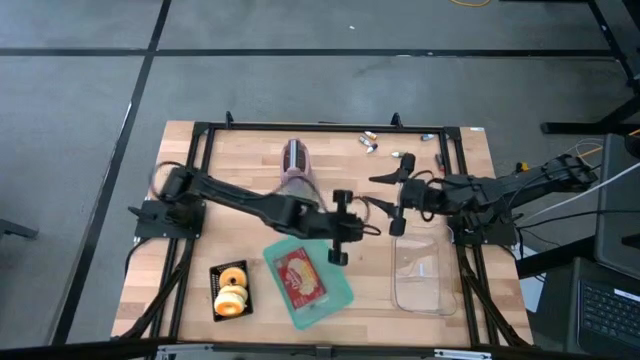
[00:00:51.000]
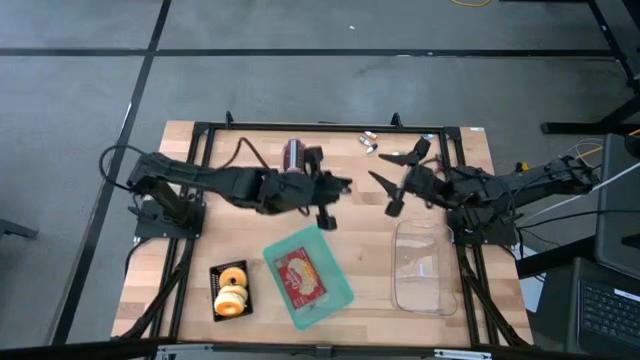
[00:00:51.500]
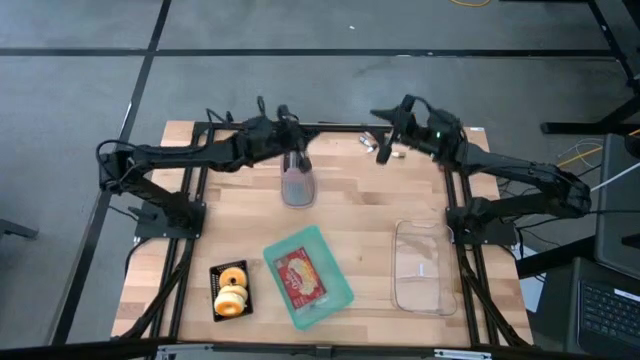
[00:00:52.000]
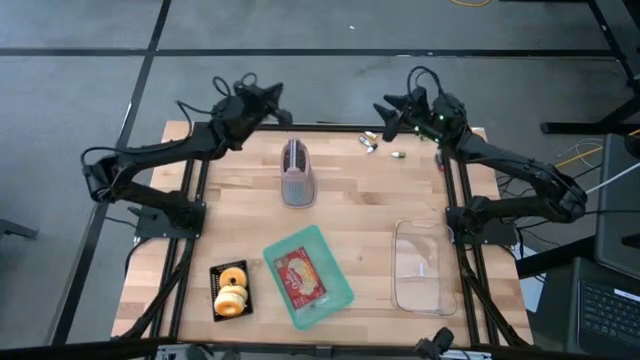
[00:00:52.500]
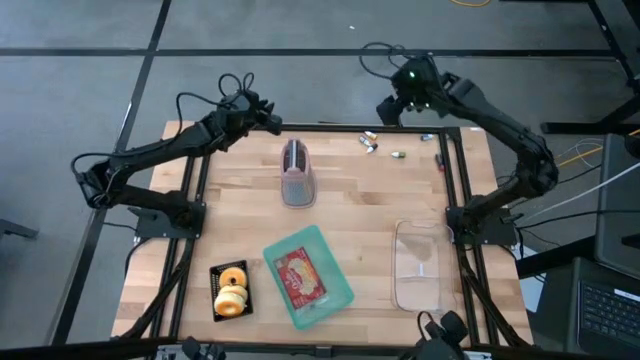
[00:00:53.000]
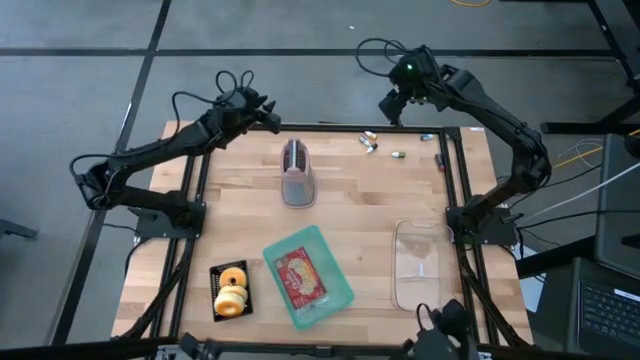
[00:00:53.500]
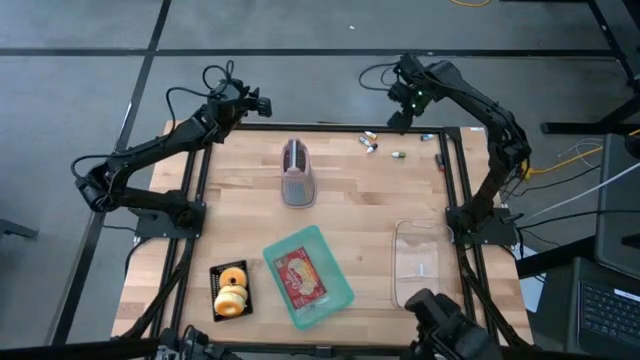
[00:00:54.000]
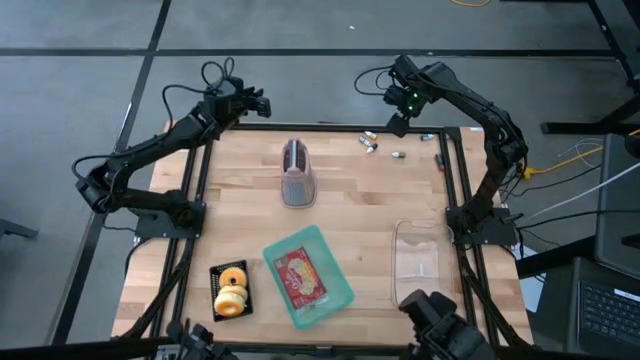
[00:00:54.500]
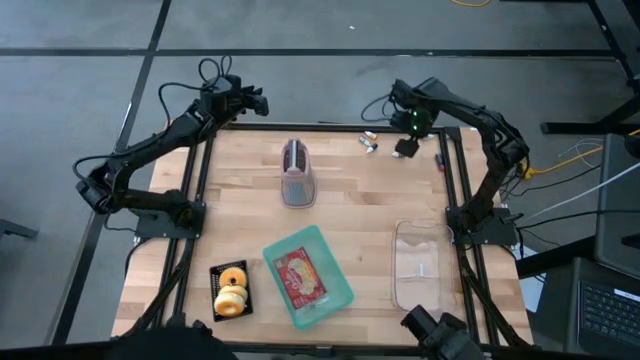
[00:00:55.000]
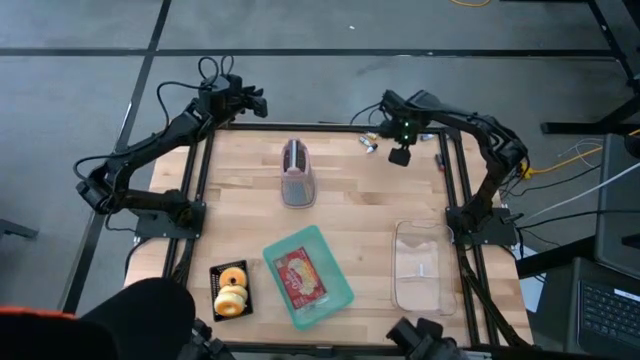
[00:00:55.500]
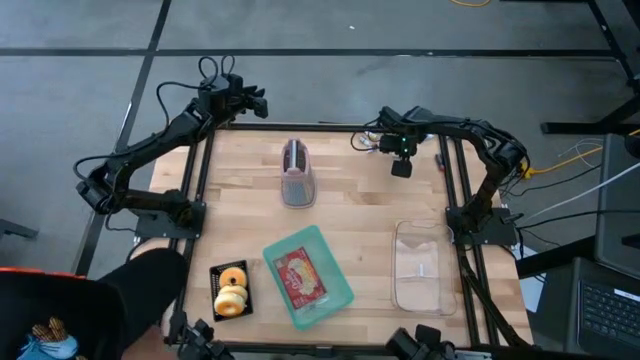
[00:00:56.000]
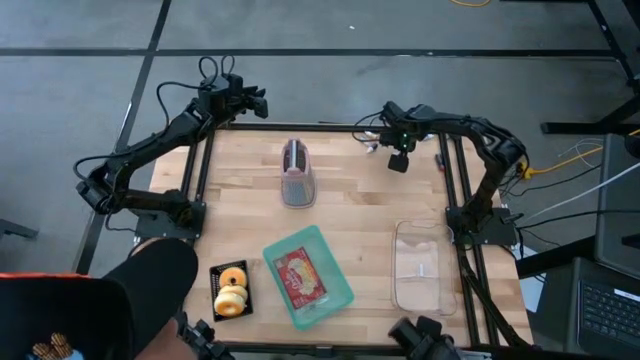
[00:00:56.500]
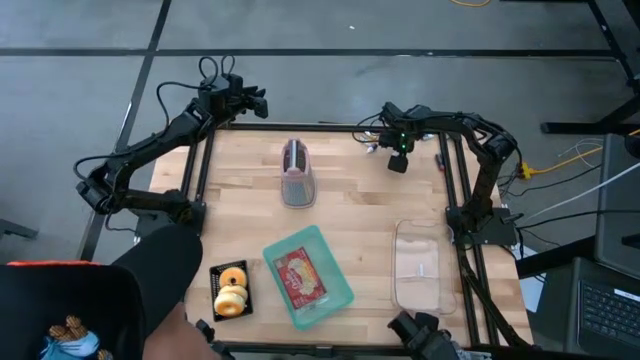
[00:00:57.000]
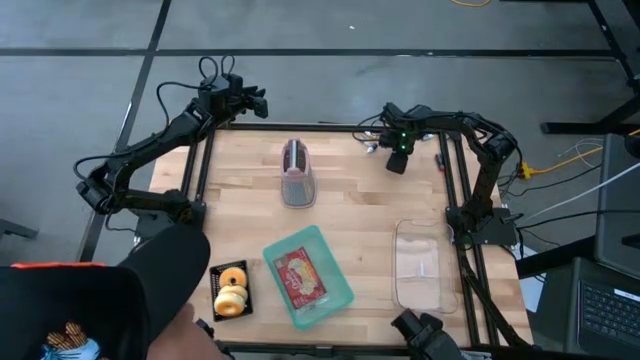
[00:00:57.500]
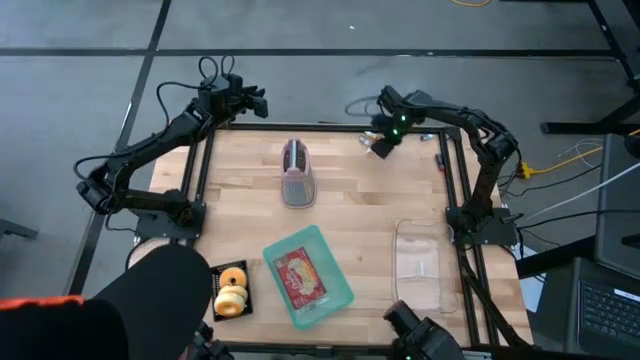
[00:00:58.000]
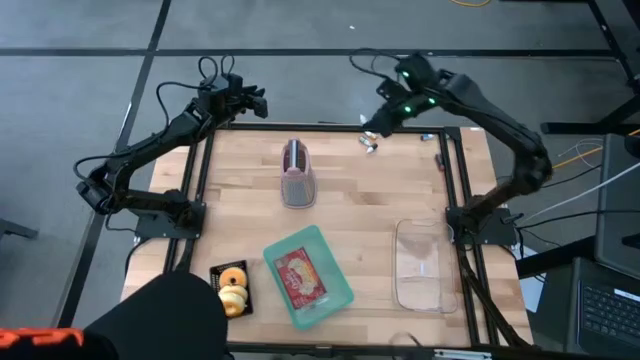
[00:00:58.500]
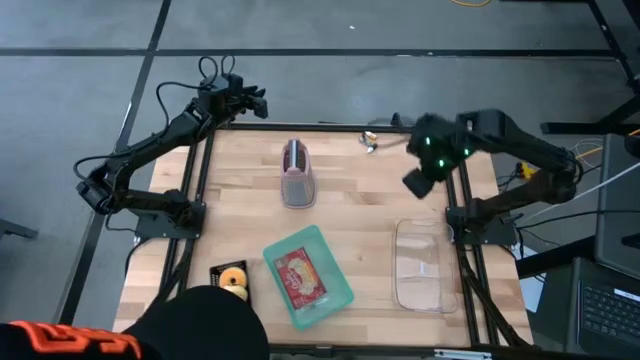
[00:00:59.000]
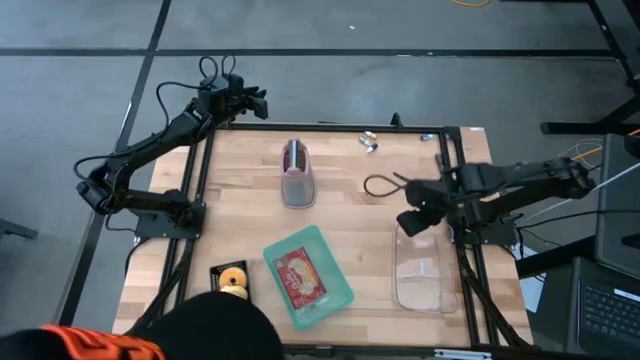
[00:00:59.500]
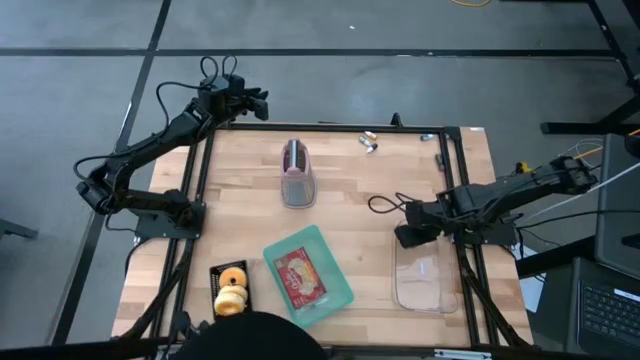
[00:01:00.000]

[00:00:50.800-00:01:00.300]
Task: Pick & Place Food Item
Put the green food coloring bottle into the transparent bin

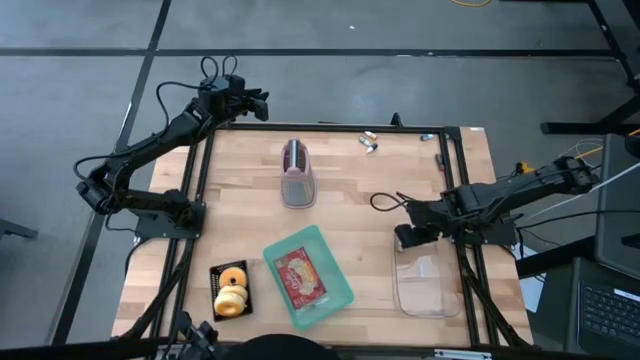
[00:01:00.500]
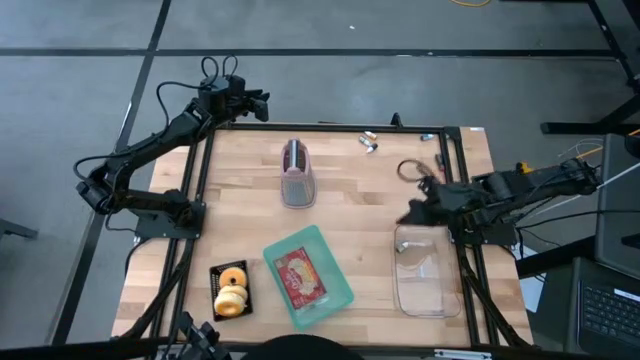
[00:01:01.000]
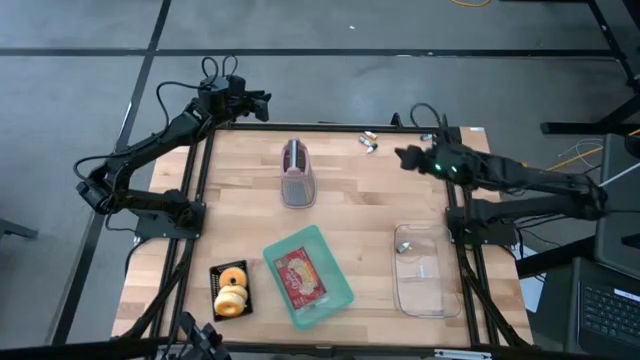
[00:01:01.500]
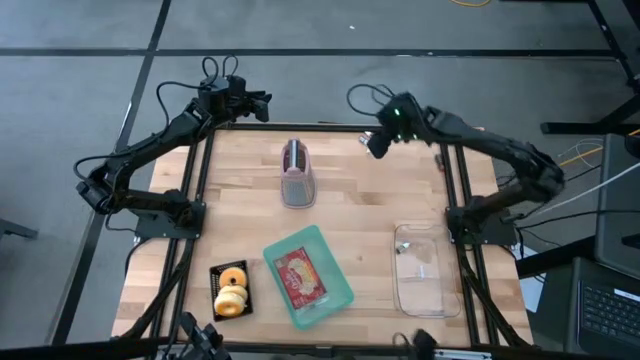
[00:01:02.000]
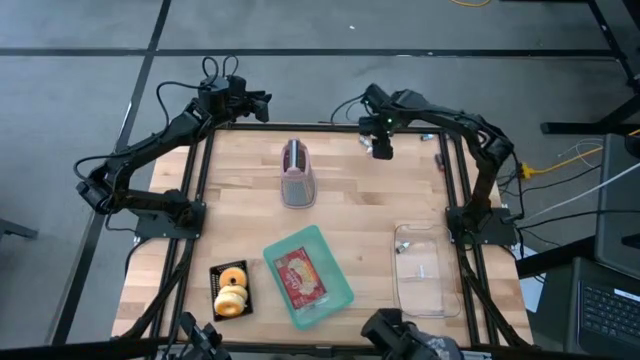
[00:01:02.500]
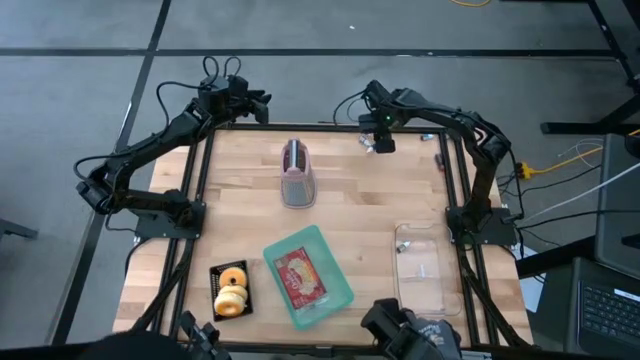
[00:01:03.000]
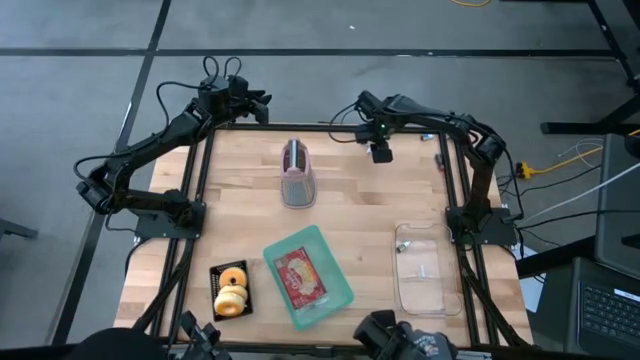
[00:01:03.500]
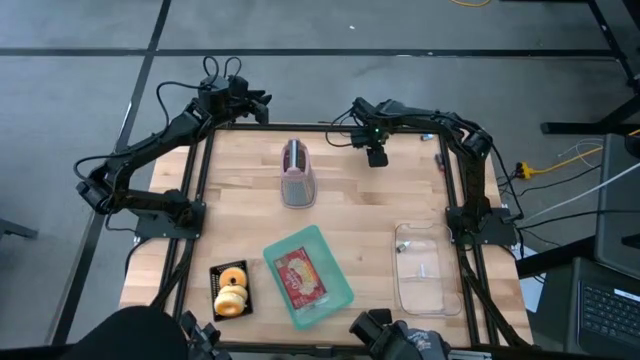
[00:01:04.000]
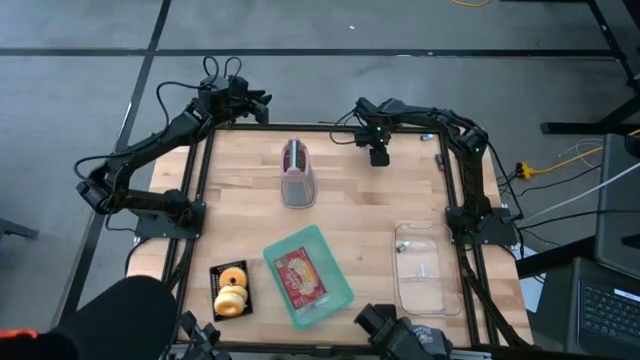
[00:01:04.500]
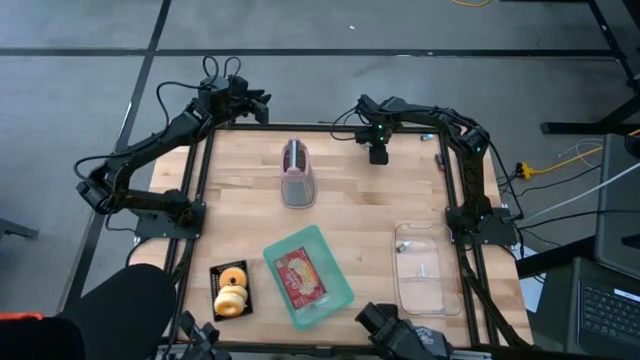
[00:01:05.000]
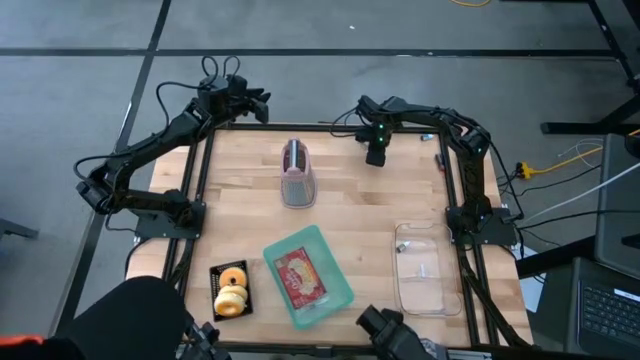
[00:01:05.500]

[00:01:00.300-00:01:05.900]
Put the purple food coloring bottle into the transparent bin

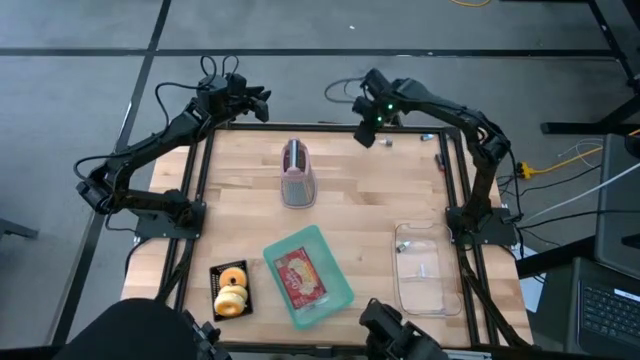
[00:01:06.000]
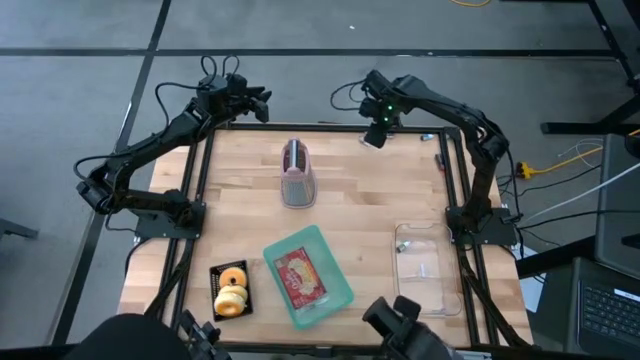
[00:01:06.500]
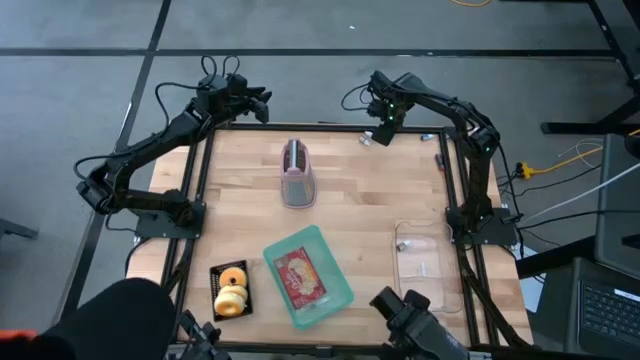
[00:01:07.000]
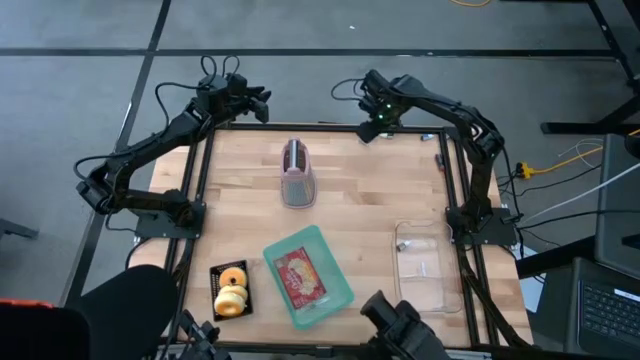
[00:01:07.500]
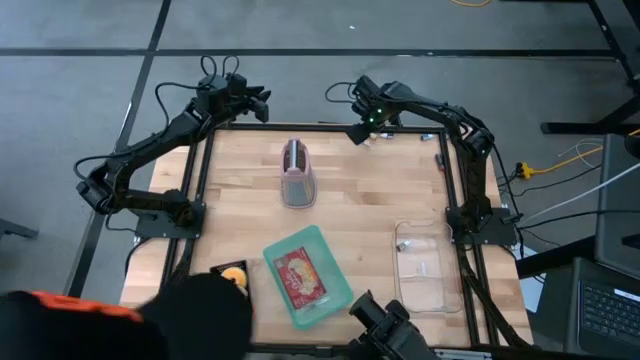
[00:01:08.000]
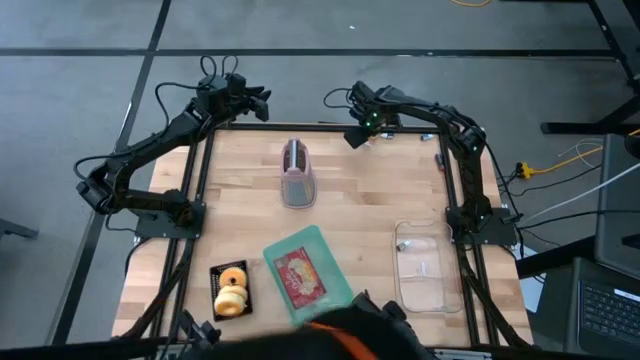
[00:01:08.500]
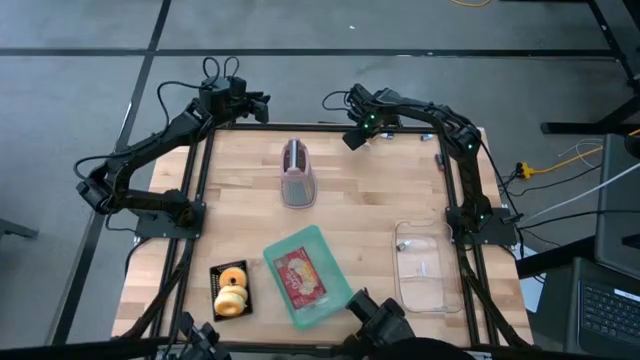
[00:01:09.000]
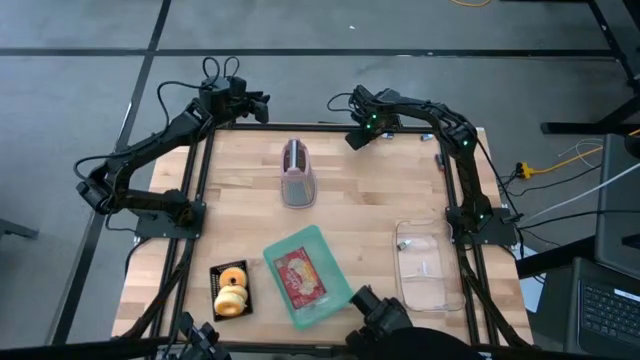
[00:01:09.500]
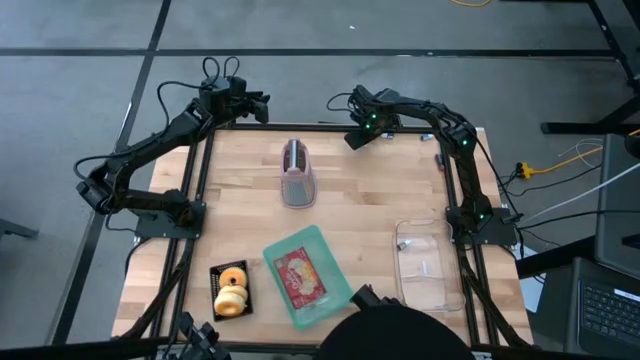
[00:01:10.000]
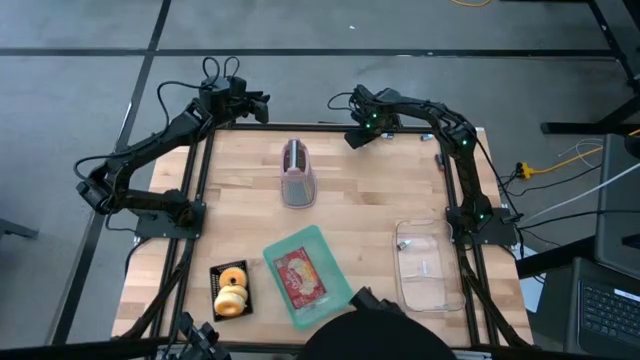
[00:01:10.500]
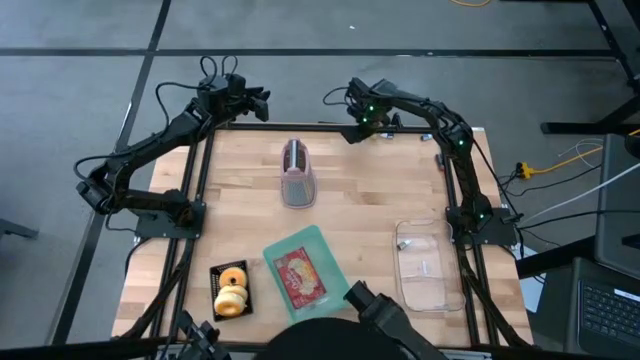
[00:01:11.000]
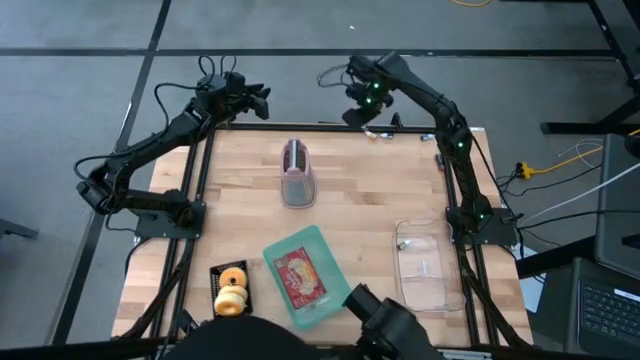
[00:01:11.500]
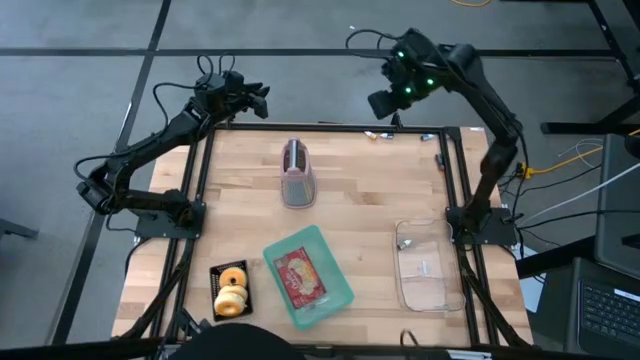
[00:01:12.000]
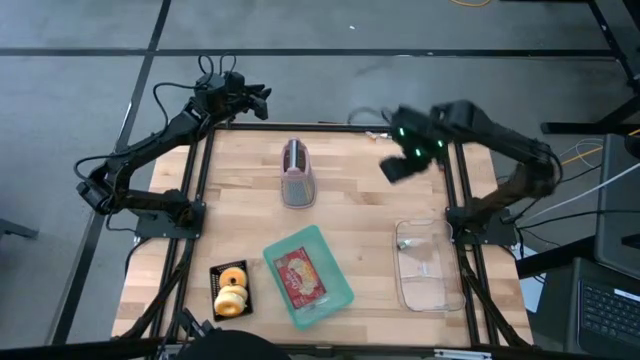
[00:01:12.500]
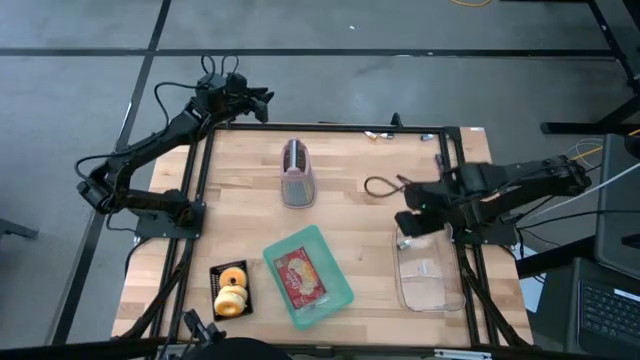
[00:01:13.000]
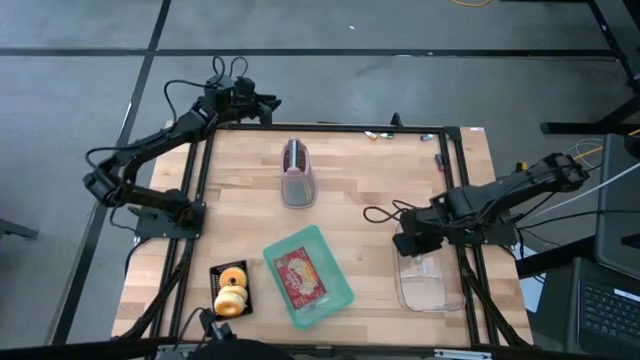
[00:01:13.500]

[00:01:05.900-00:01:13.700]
Put the red food coloring bottle into the transparent bin
